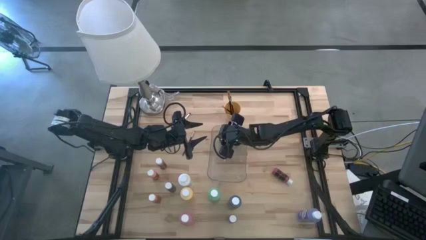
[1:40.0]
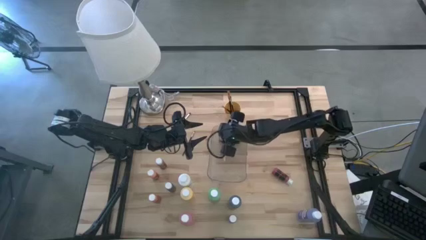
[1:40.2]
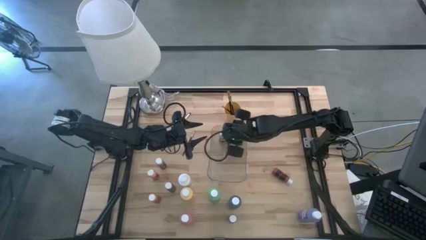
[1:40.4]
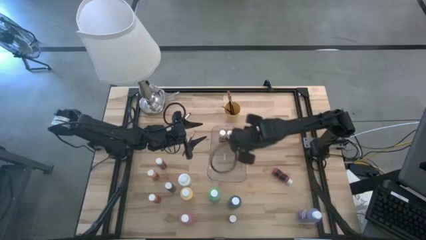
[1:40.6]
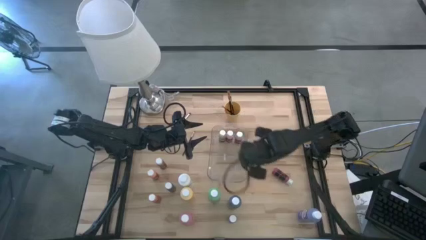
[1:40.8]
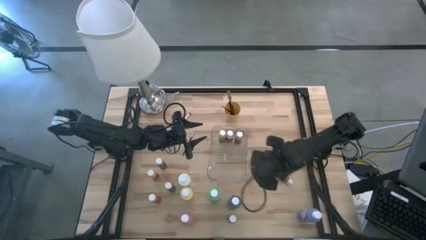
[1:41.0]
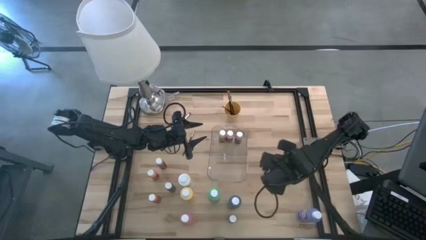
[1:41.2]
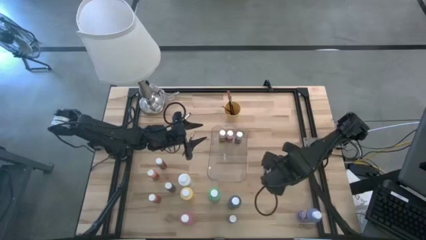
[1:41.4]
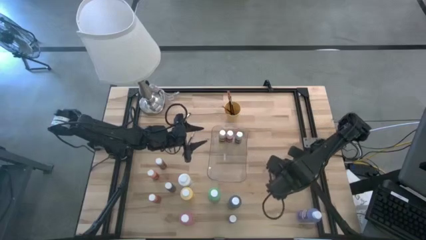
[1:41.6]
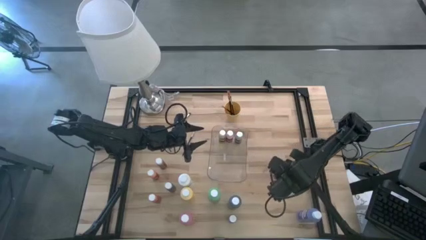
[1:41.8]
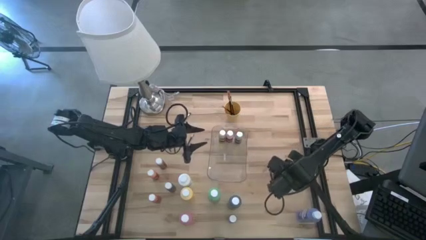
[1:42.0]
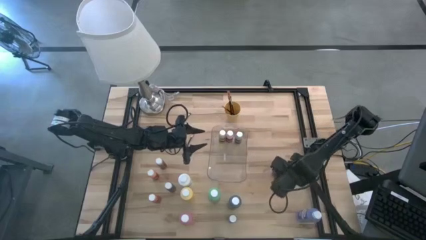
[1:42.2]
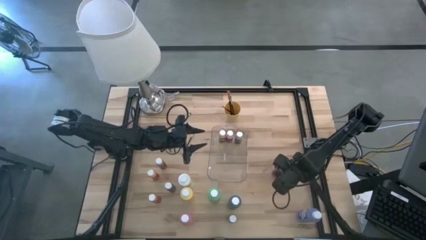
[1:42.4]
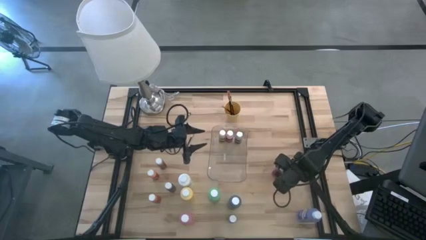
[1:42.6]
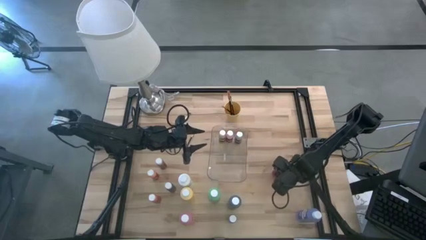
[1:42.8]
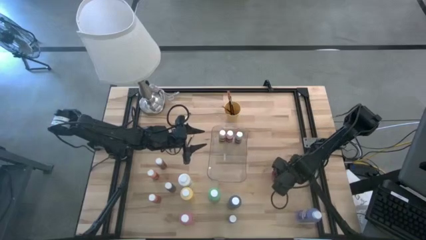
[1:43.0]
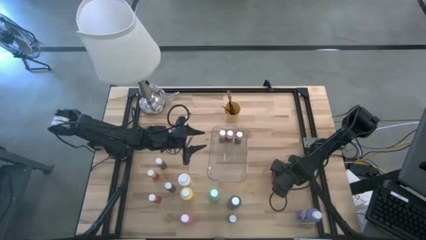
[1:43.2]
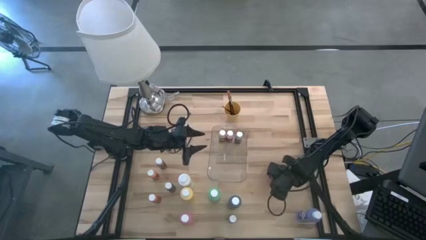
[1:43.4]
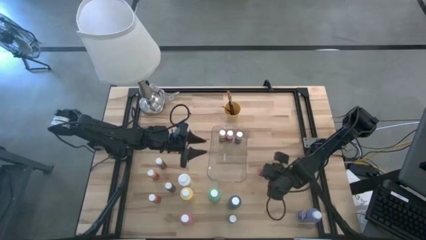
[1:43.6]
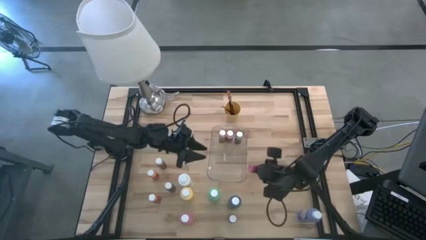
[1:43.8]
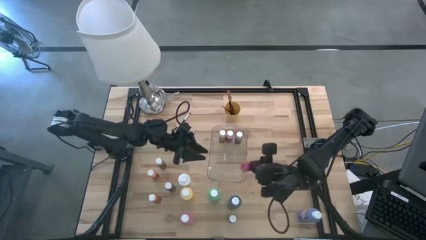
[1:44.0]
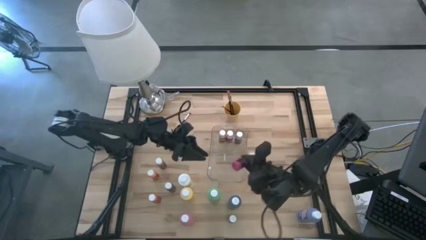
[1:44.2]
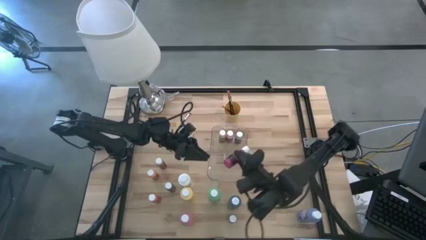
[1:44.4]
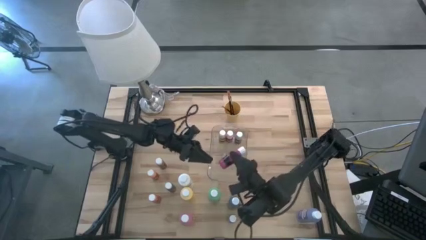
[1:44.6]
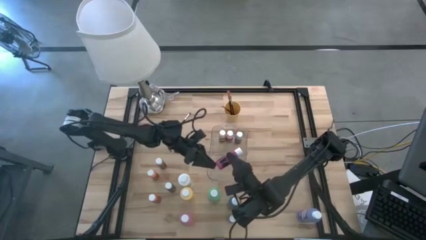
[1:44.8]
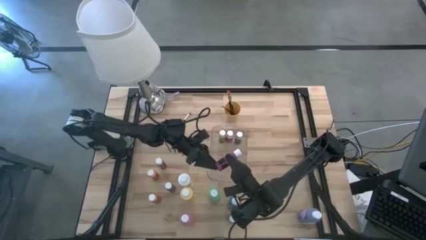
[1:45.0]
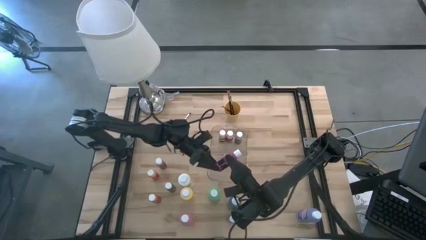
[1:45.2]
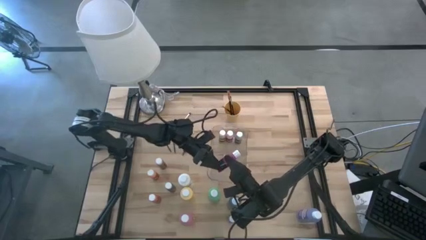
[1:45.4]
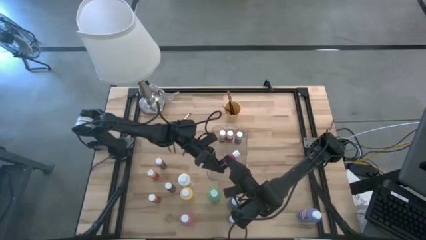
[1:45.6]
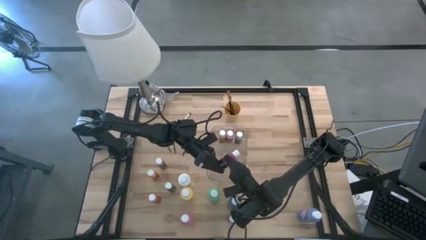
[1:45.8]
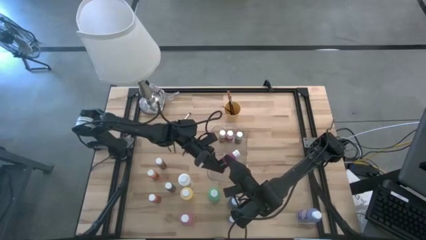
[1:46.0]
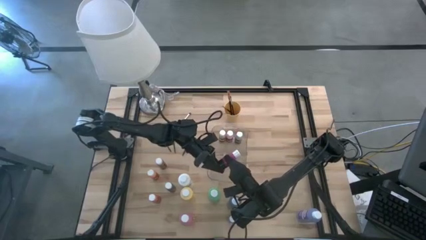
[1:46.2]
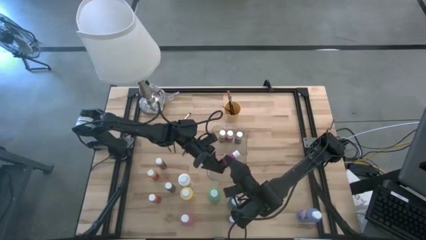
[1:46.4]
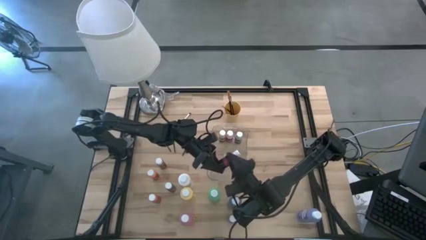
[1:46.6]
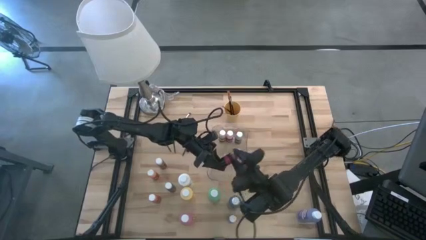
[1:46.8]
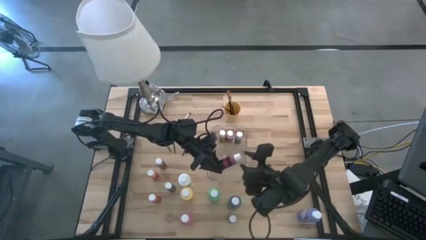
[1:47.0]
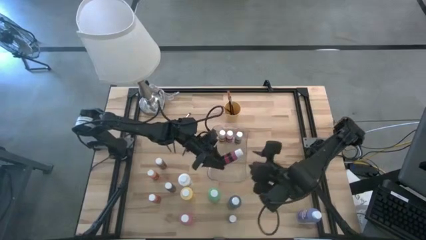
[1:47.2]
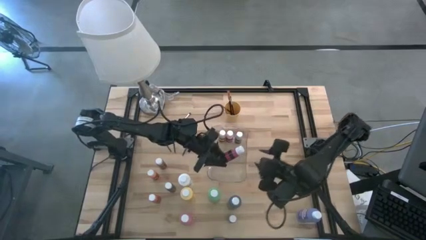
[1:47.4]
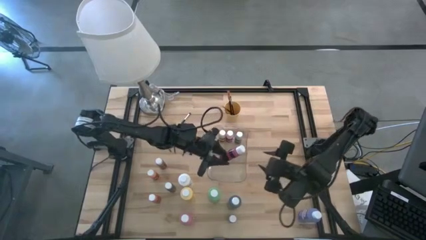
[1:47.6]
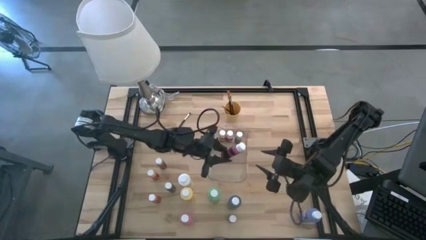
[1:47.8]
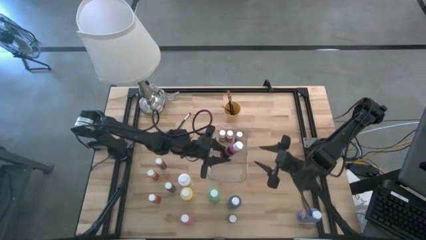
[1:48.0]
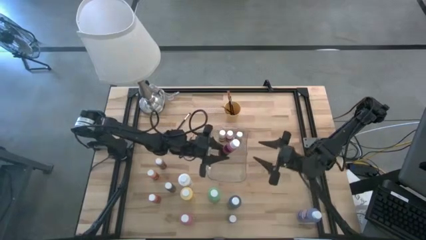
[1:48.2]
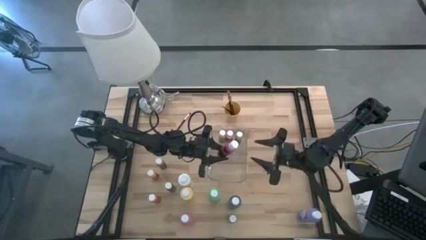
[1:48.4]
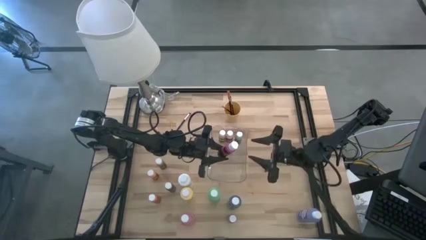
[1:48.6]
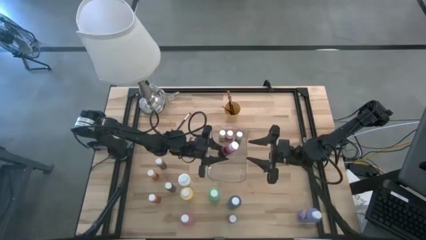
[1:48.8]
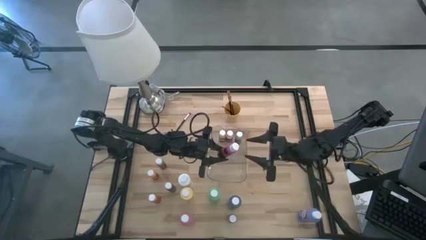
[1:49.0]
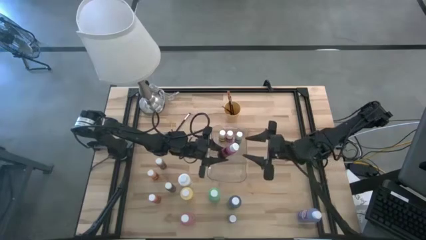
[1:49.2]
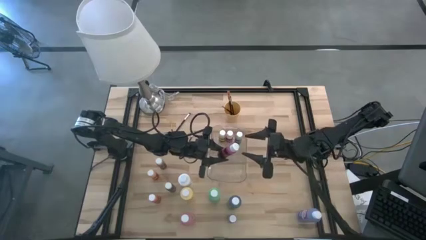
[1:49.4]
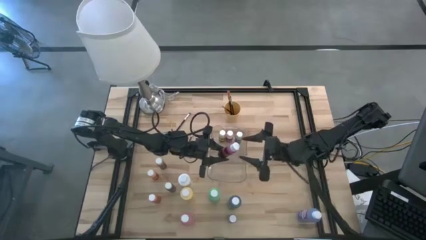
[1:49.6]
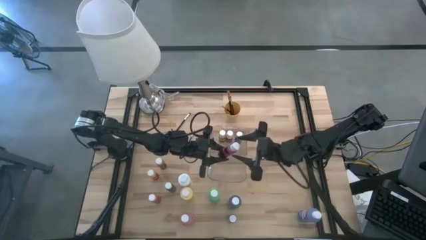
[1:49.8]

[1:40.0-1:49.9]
Task: Pick & Place Paint Supplies
Put the small purple paint bottle into the transparent bin

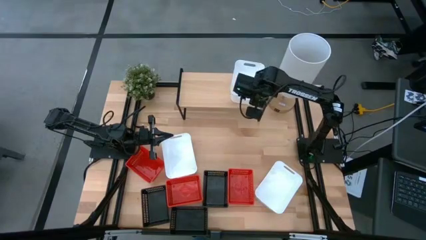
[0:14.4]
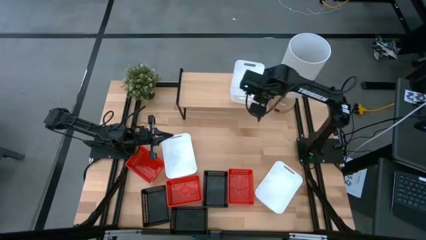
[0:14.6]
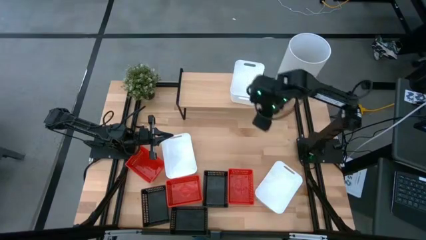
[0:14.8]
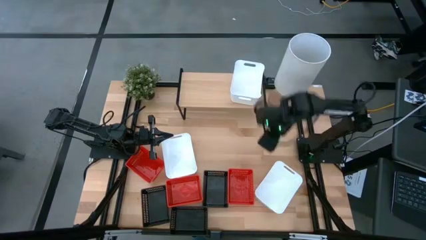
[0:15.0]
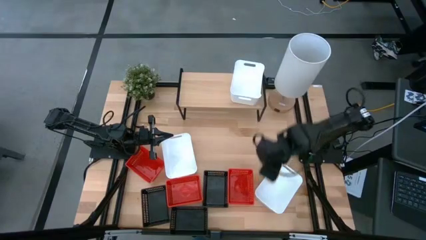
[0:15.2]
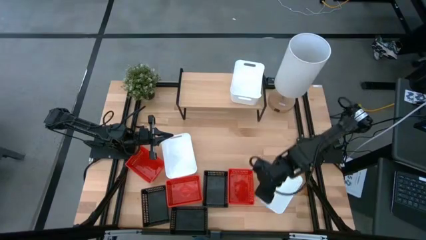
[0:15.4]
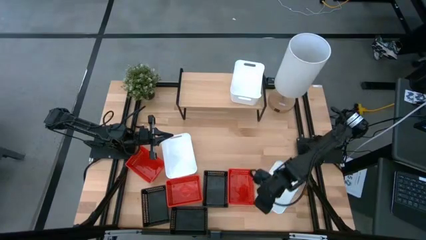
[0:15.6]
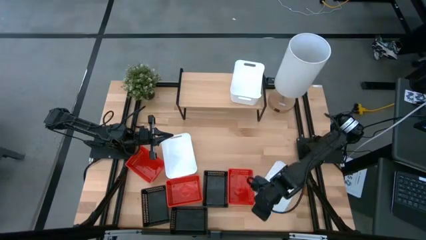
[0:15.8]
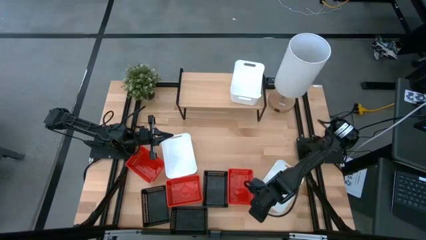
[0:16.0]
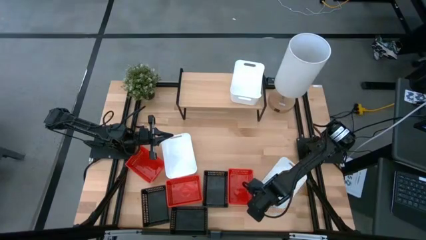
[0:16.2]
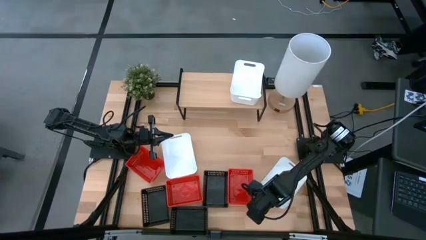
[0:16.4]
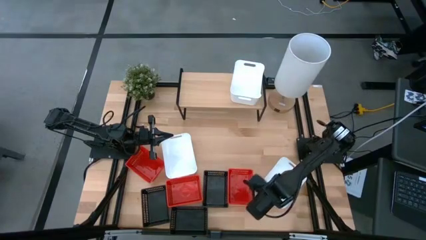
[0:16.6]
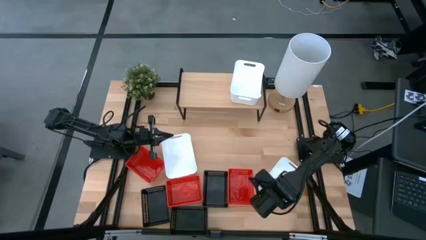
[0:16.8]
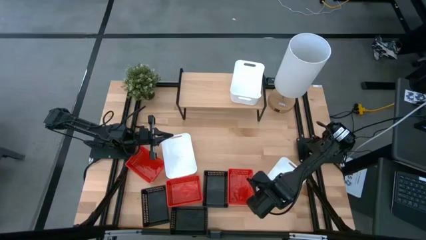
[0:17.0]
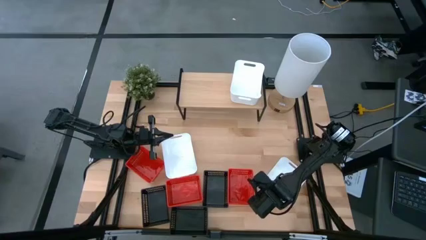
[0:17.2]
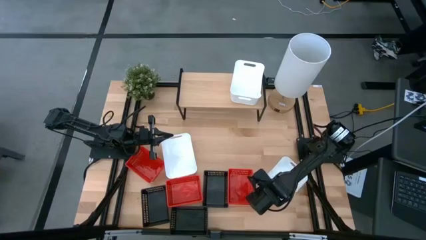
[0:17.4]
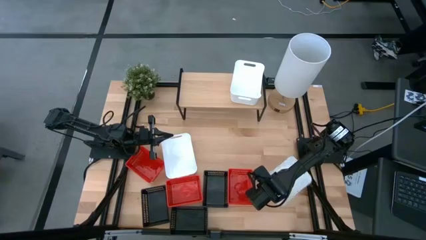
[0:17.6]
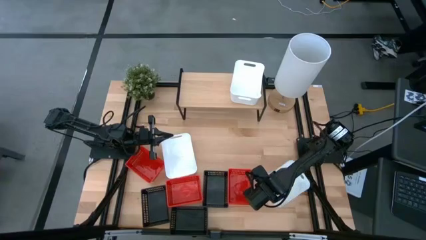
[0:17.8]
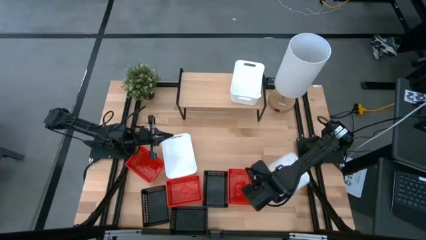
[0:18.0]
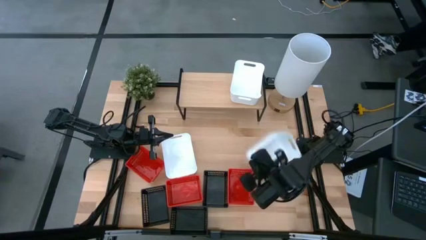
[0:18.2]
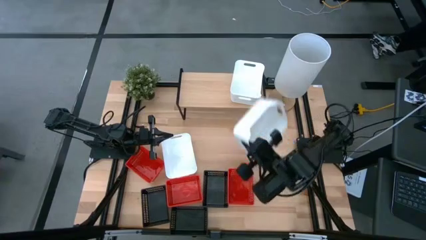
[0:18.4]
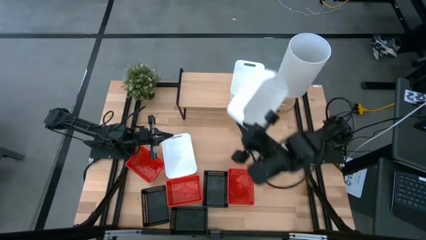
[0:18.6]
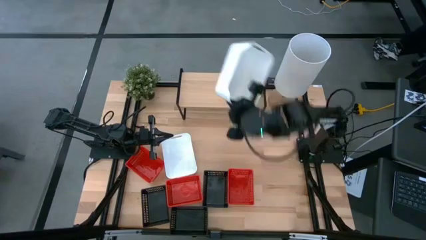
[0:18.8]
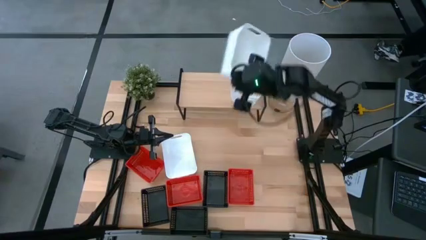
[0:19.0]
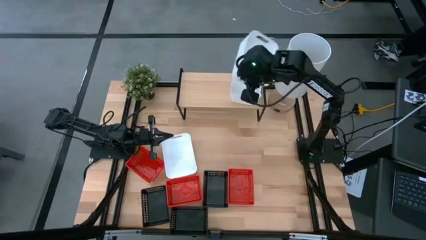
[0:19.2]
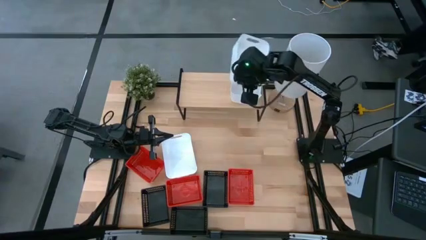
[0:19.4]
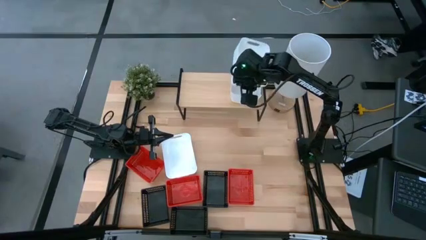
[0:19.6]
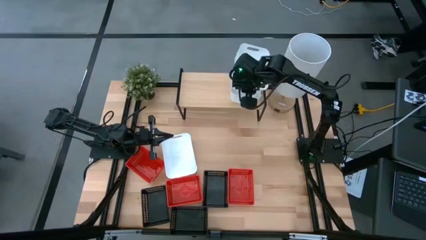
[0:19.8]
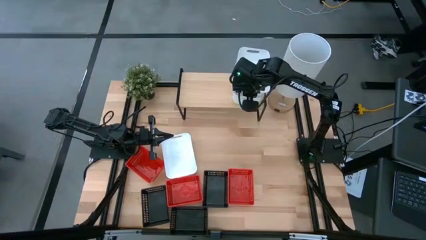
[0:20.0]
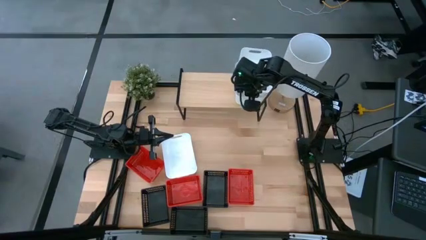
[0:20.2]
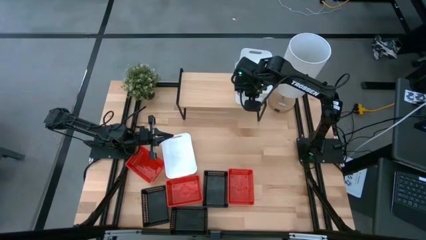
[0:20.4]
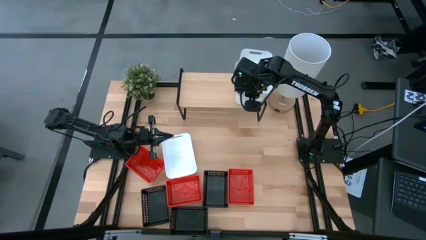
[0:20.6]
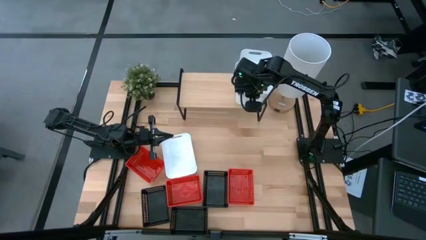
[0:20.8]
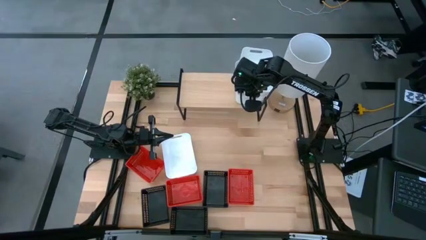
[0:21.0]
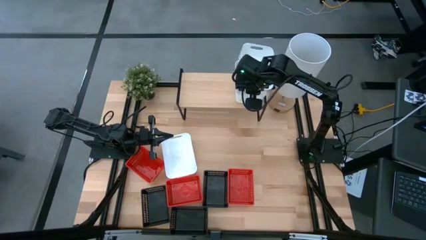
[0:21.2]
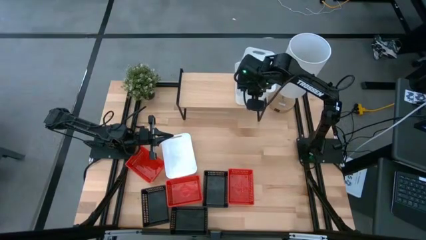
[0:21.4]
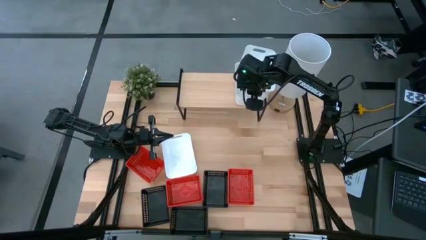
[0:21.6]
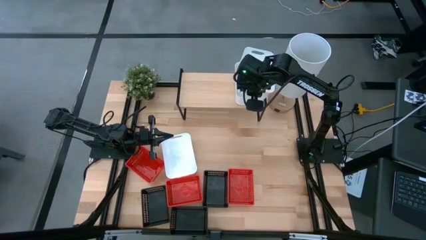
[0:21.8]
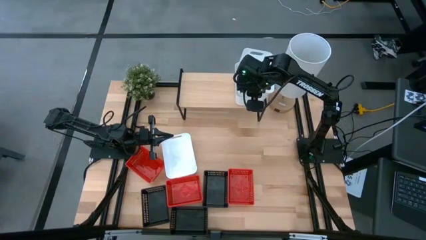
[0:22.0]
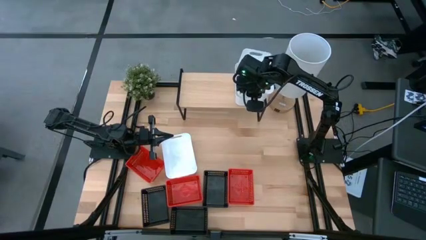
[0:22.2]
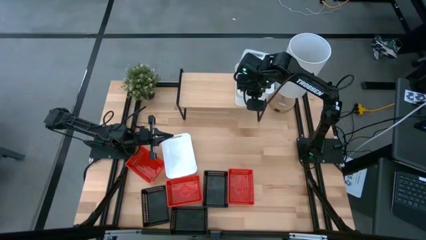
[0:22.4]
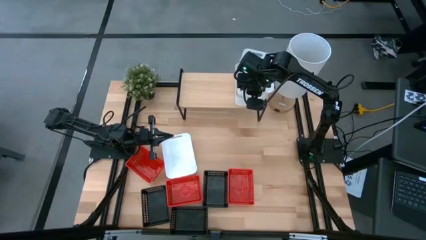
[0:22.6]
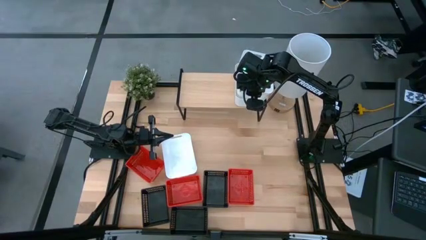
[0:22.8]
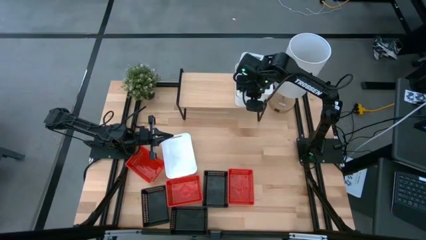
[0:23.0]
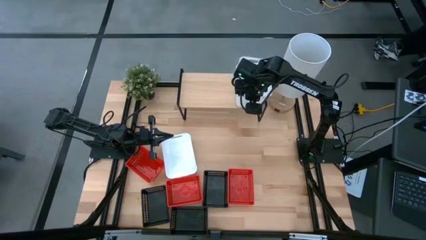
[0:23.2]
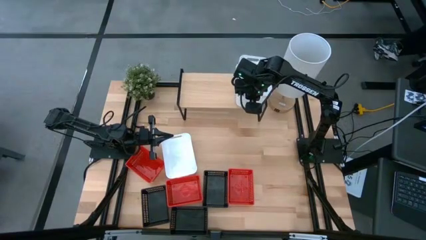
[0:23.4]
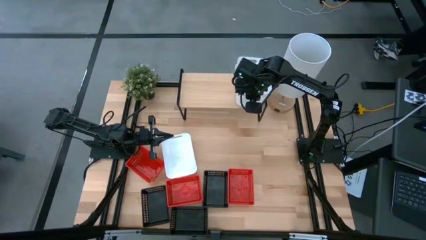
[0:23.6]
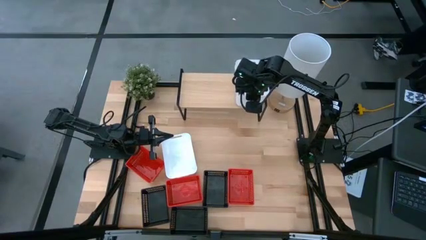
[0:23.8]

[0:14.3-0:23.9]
Task: Stack baskets on shelf by color
Stack the bottom white bin on top of the white bin on the shelf
